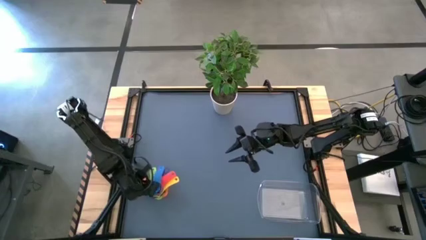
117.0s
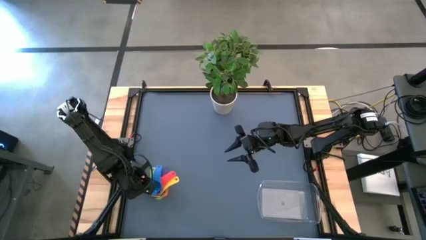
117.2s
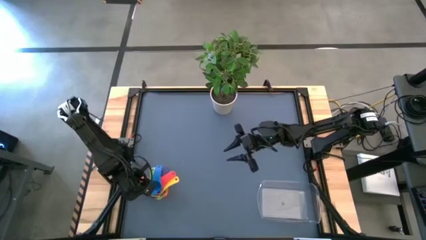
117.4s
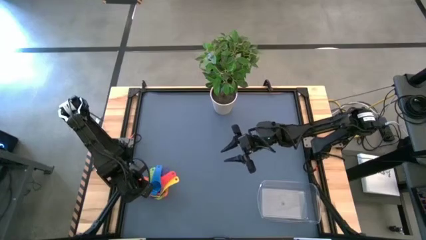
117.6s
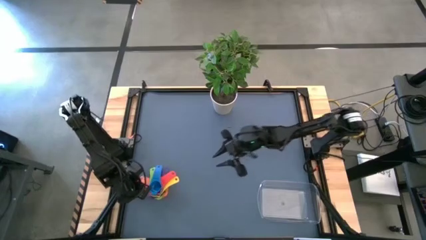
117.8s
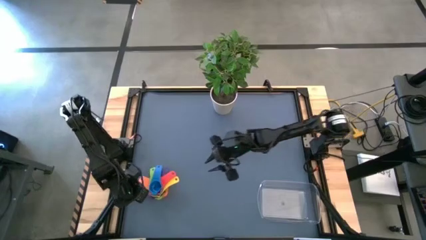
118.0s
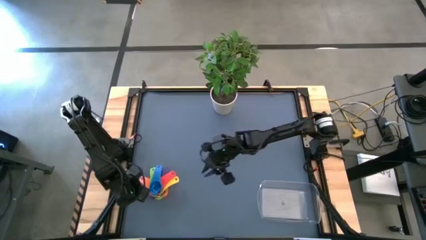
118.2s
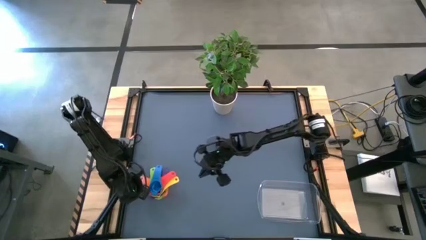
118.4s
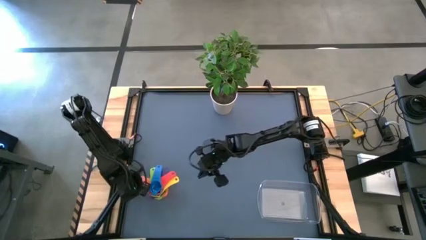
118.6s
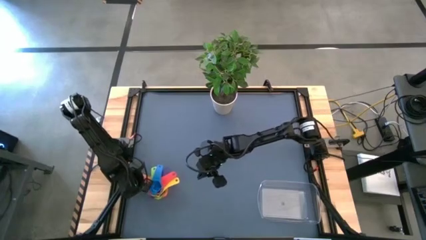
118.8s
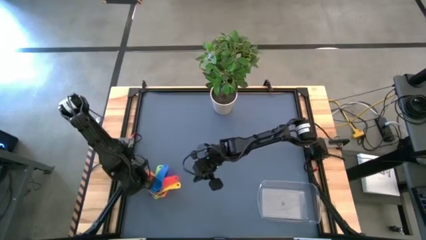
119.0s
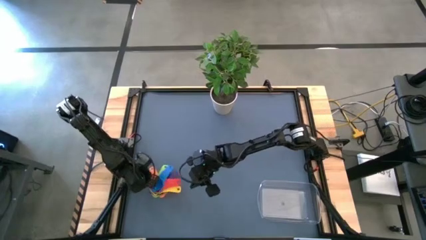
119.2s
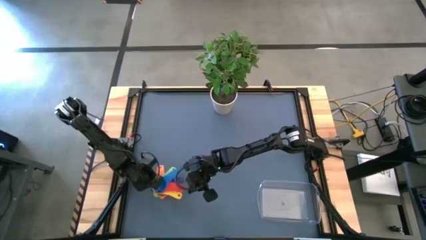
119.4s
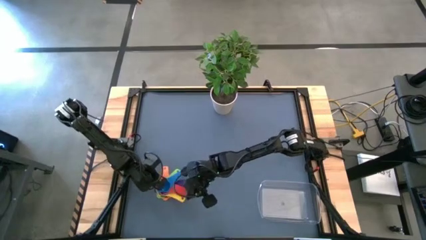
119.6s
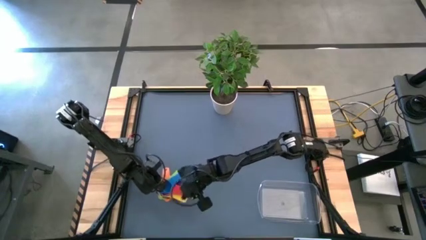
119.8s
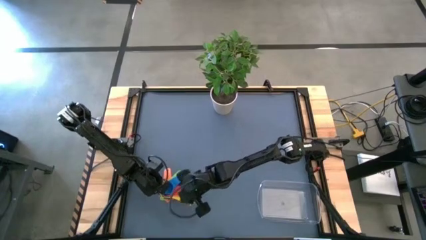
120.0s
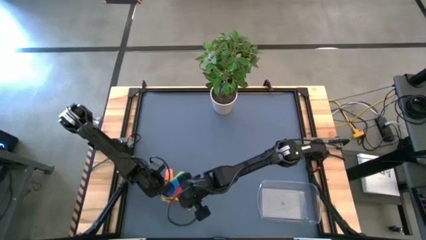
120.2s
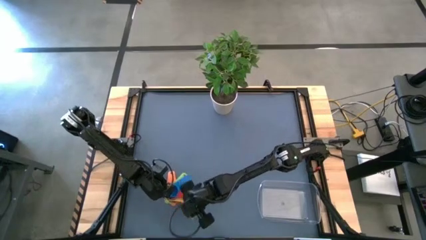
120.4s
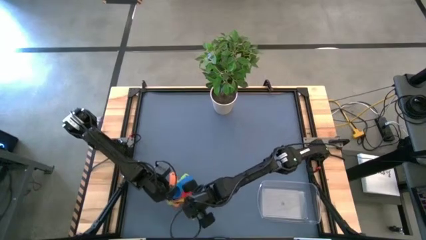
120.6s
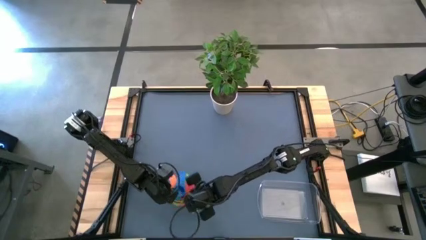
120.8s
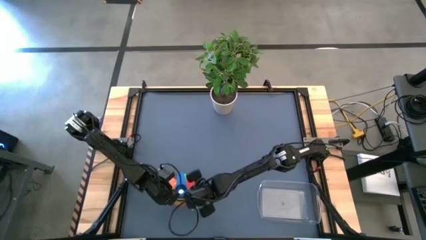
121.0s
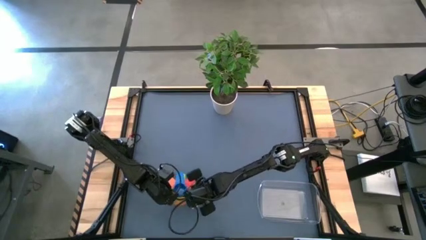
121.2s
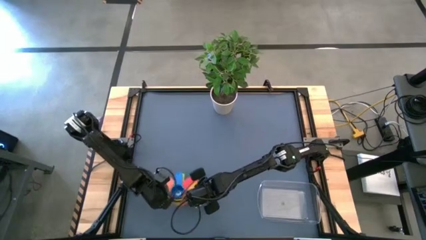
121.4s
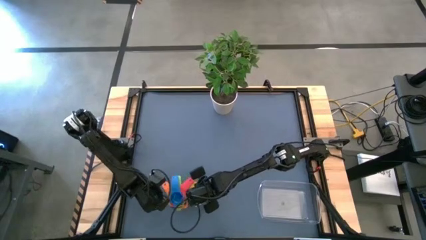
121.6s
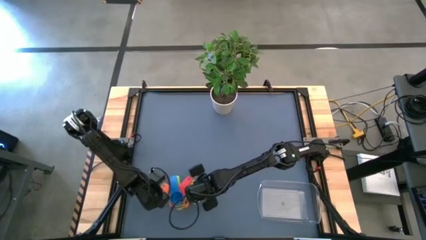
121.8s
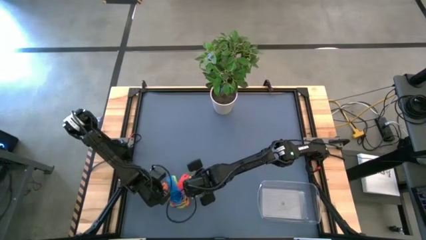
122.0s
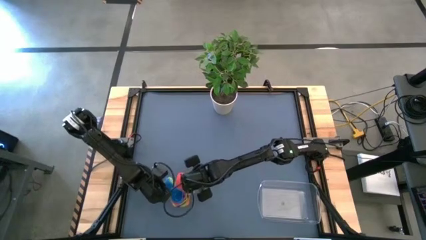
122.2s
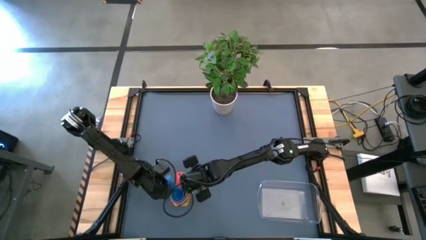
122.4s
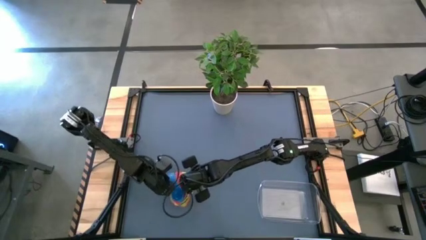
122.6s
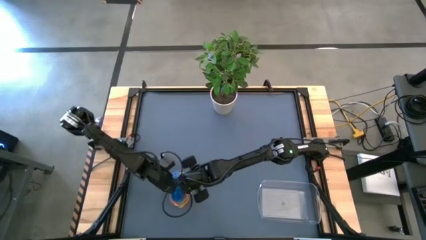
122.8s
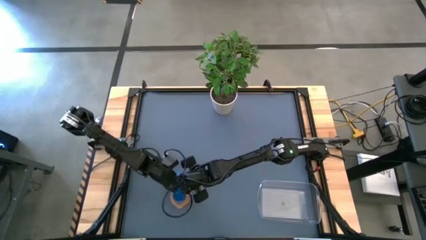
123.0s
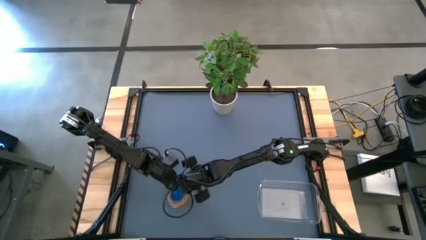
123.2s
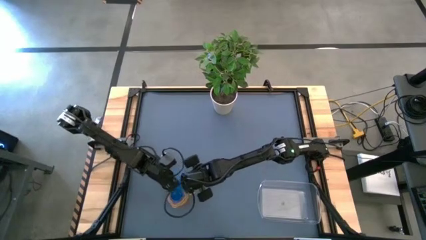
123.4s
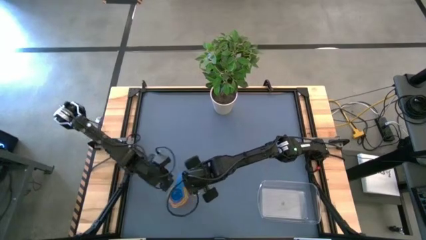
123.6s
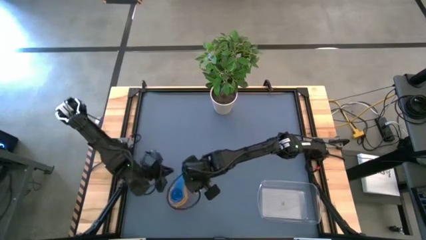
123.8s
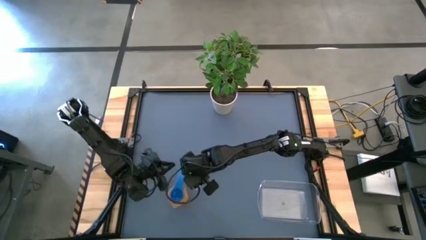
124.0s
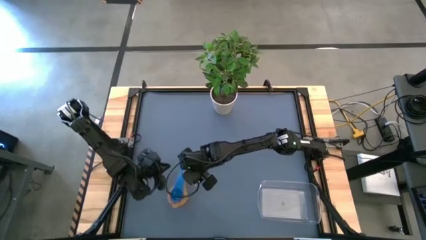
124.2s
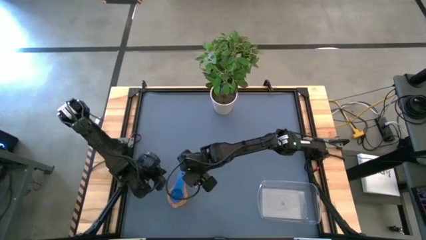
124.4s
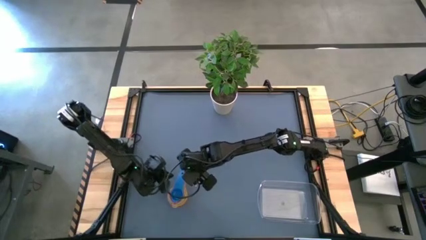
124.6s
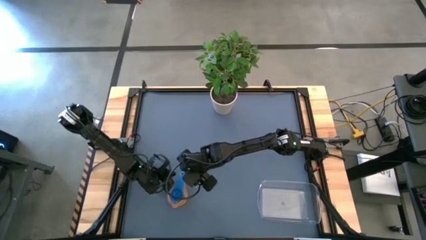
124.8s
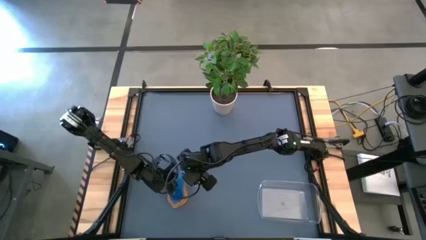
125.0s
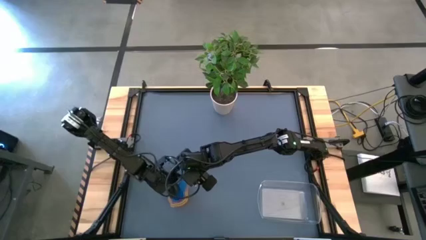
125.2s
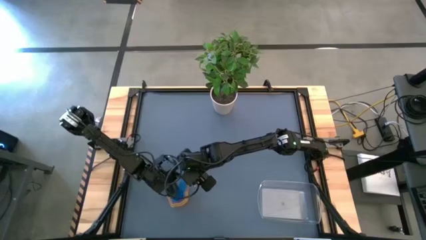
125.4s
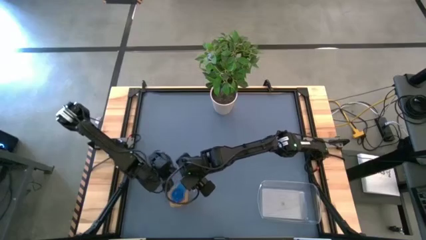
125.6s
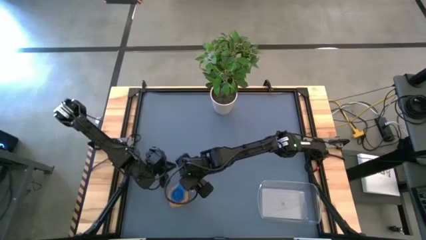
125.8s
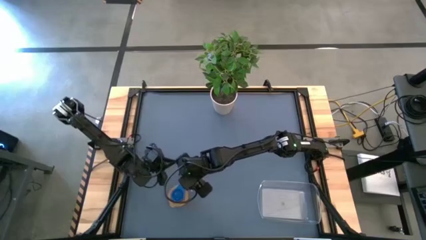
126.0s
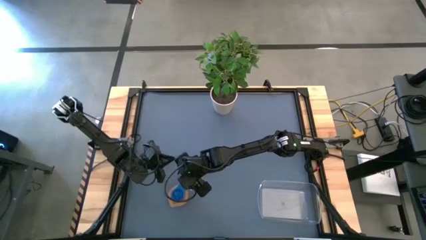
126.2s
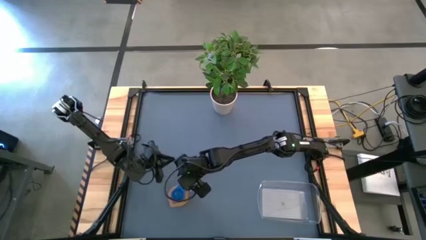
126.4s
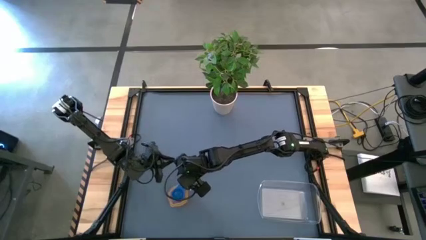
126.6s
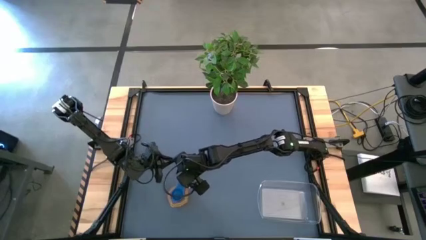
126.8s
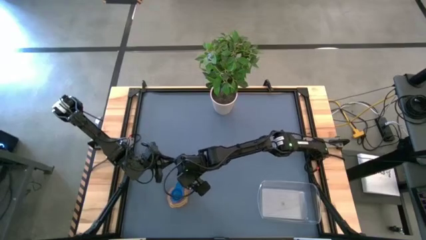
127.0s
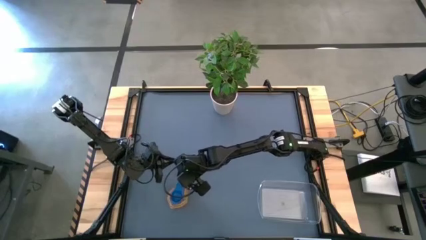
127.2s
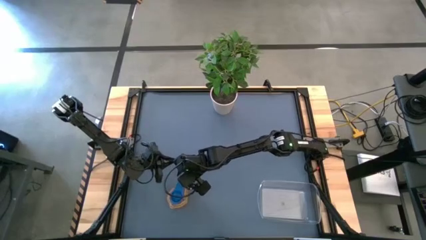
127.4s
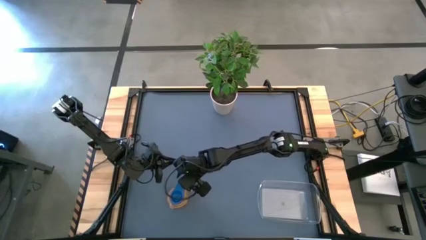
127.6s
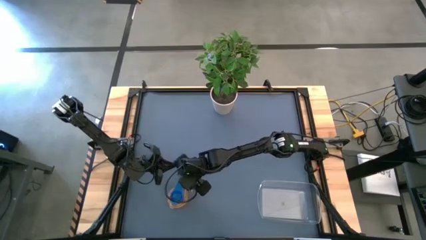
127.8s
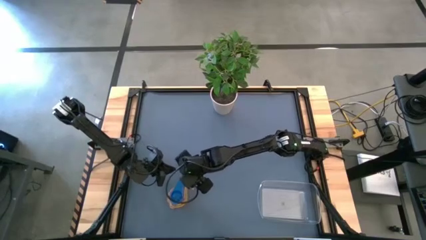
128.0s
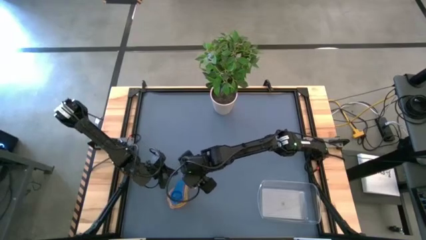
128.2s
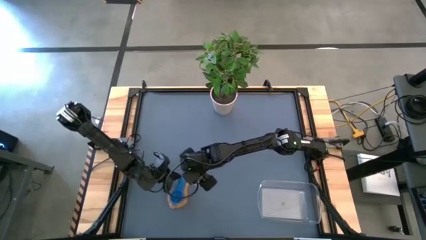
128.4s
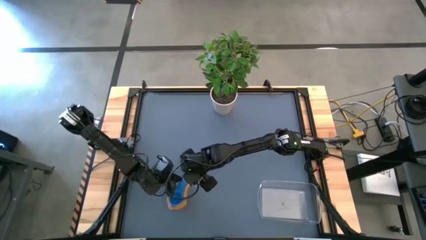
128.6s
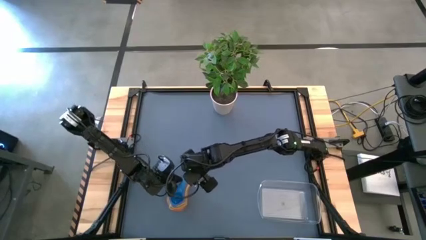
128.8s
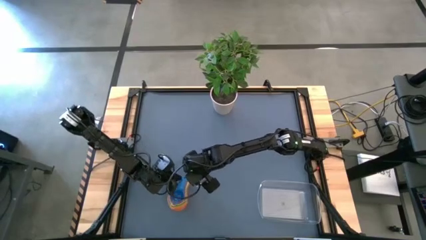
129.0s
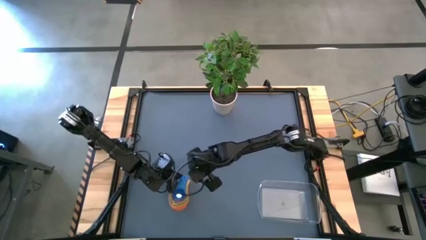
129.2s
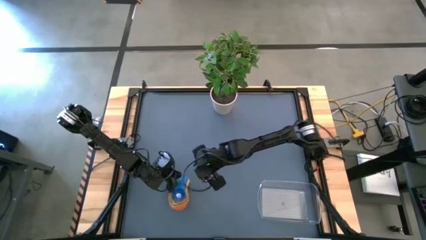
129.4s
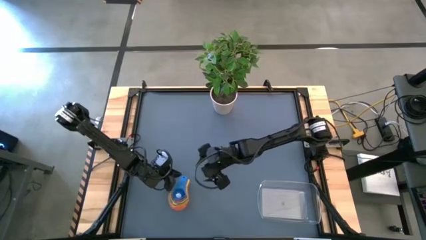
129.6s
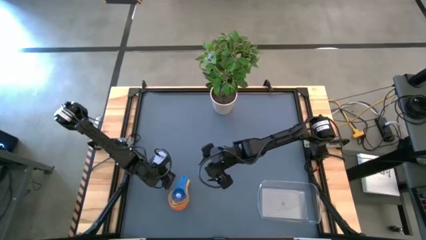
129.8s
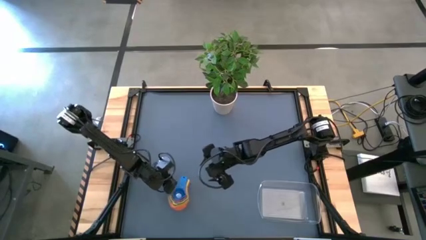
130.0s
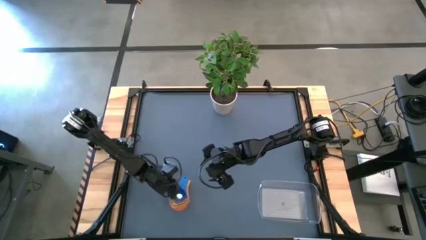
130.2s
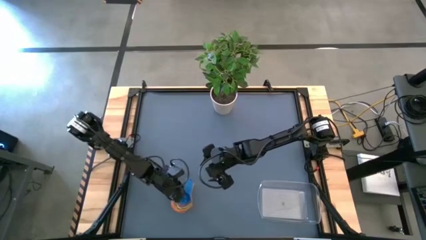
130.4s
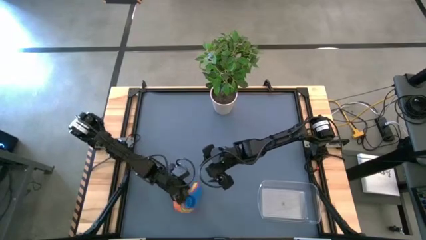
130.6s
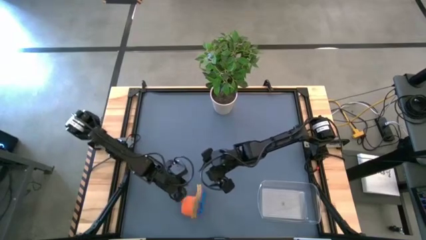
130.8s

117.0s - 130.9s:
Task: Nest measuring cups in basket
Adjust the nested measuring cups

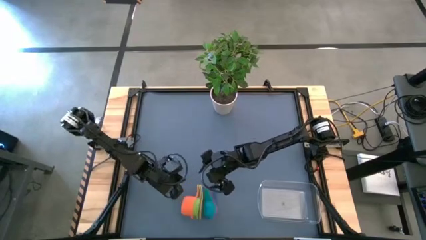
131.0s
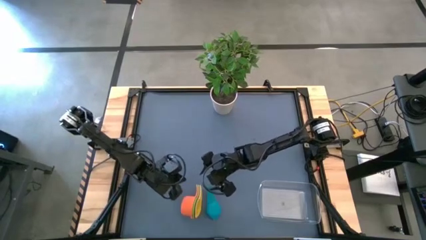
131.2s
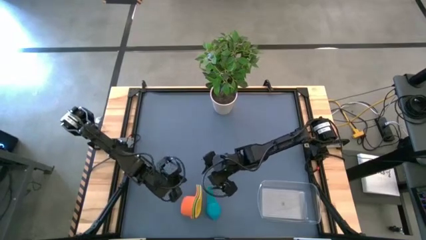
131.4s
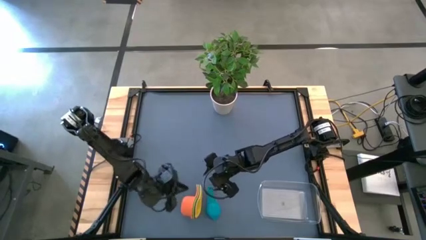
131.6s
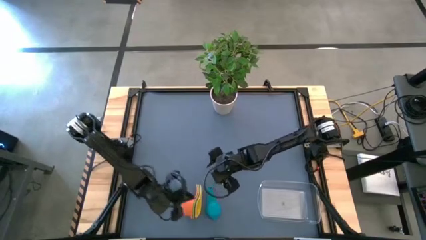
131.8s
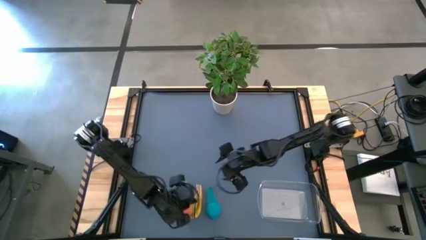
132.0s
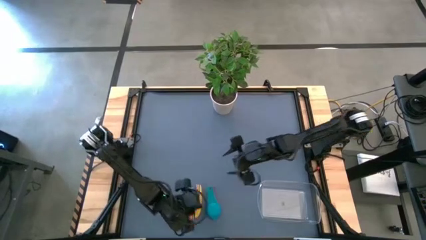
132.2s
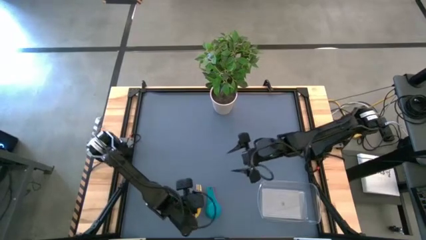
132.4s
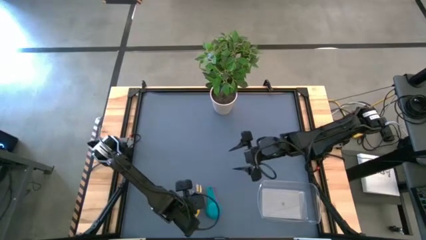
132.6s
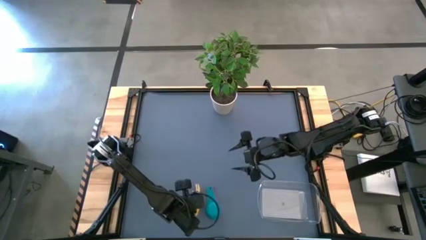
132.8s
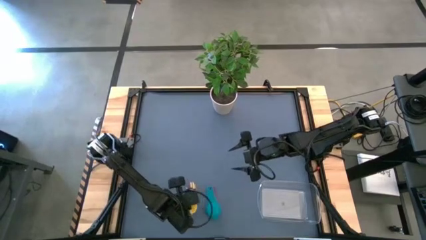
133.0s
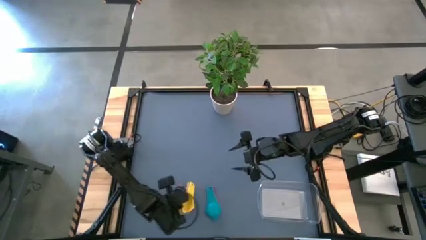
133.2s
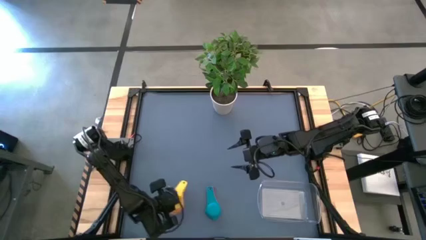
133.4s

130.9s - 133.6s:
Adjust the nested measuring cups
